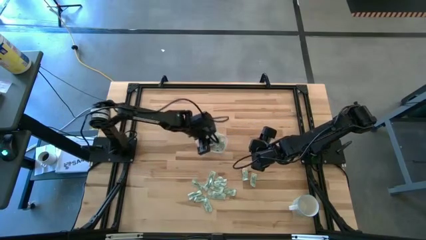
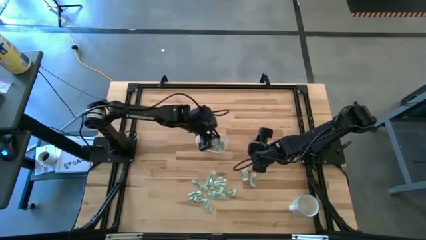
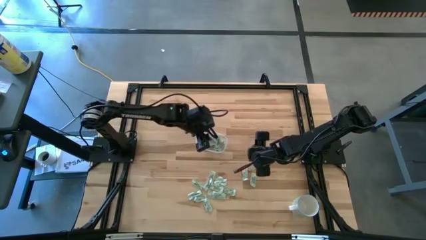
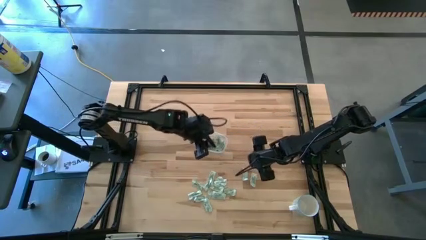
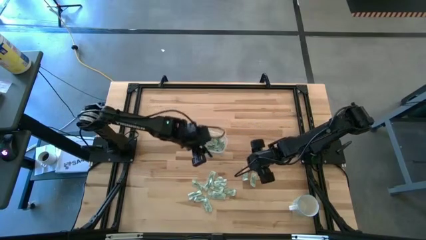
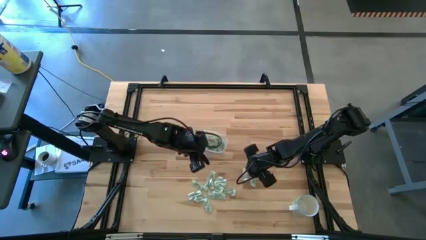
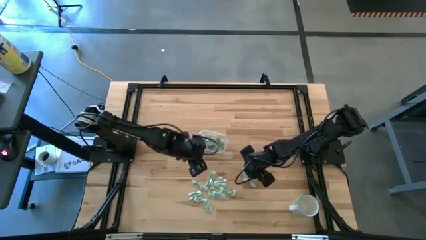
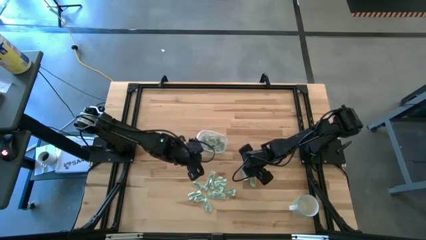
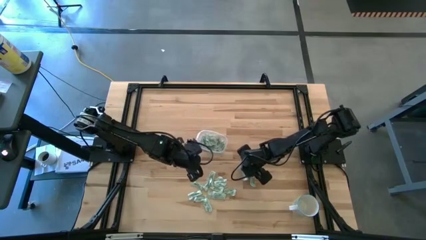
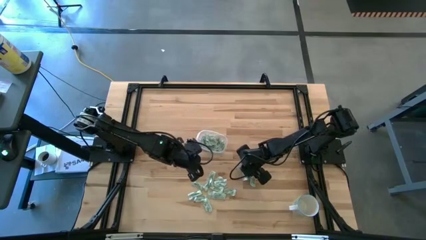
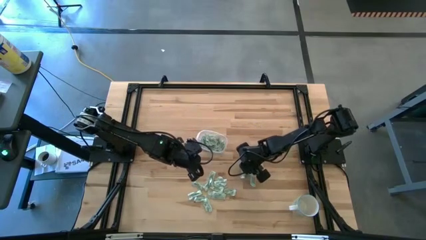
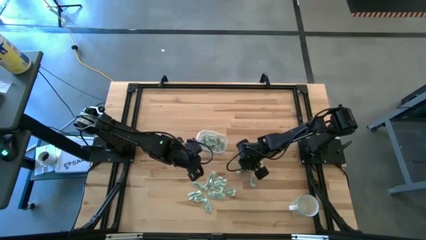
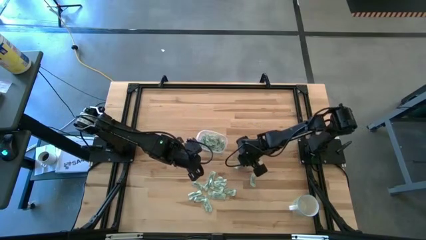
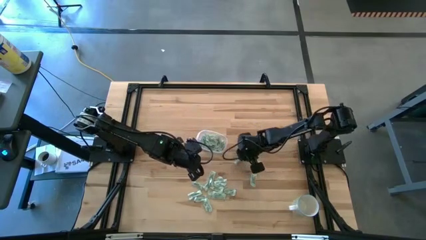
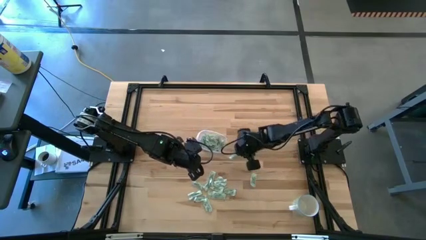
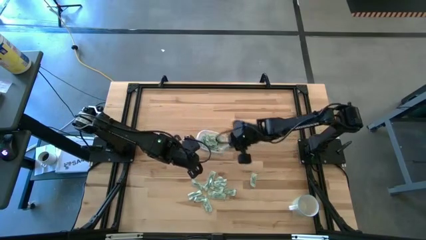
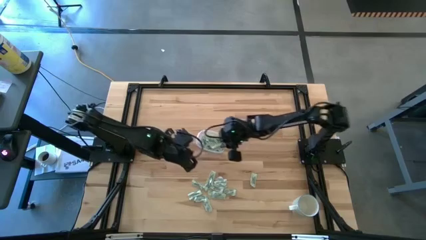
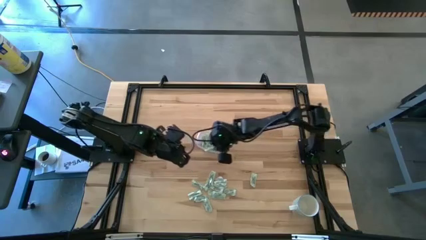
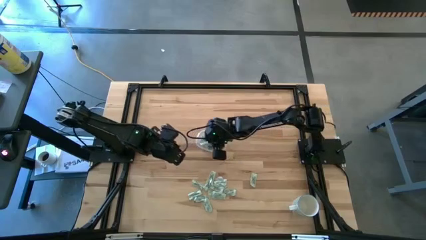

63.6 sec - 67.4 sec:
Task: Pick and place Stevia / Truvia into bins
Put the stevia packet into the transparent container

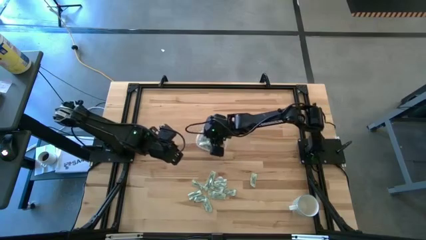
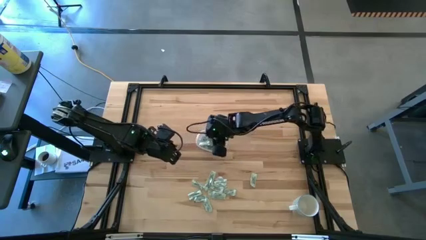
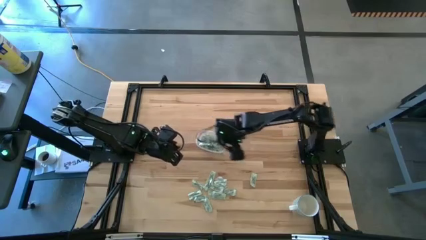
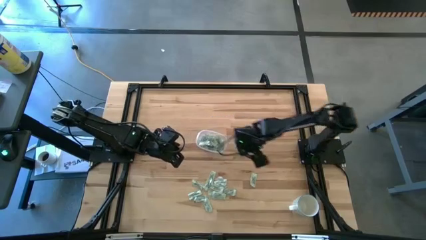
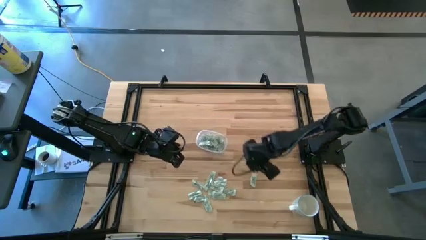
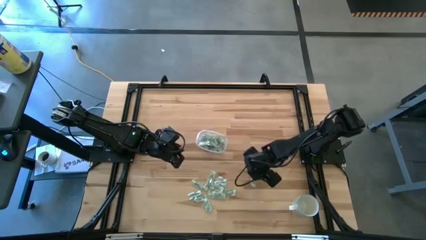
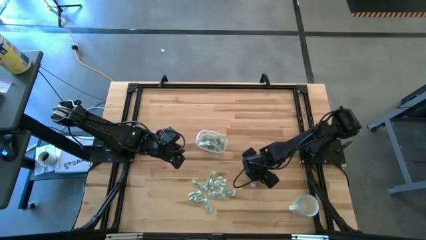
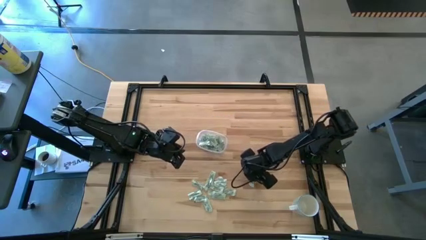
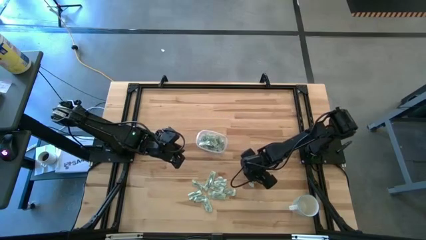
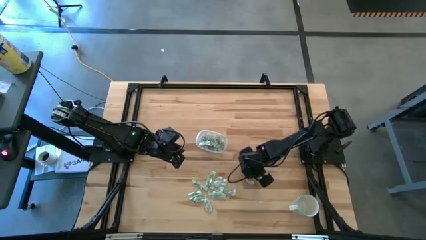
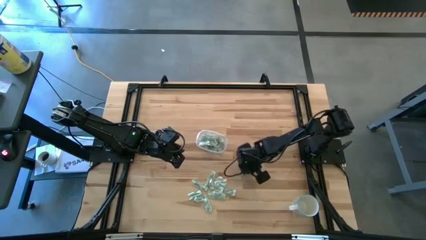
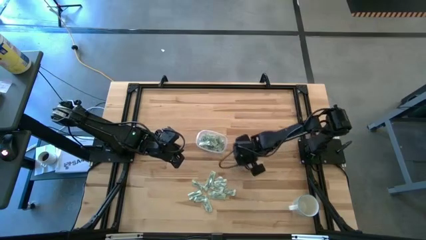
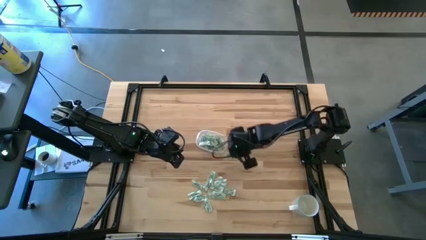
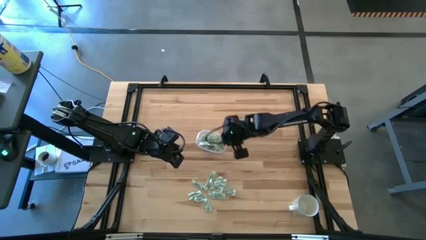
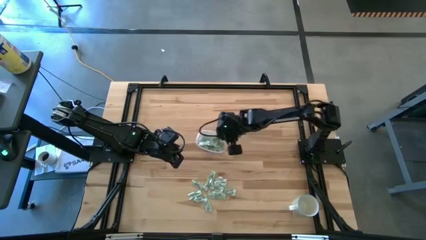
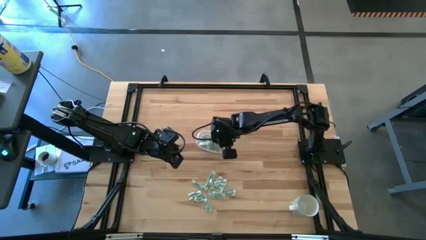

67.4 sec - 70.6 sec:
Put the stevia packet into the transparent container

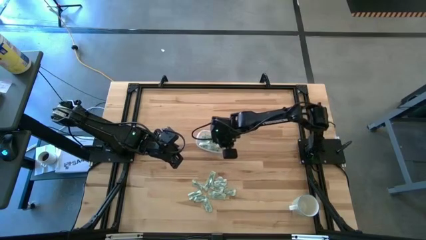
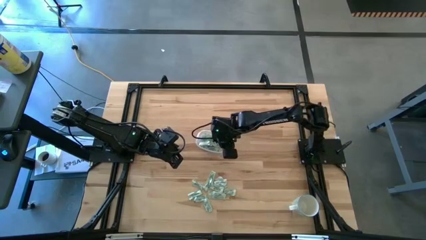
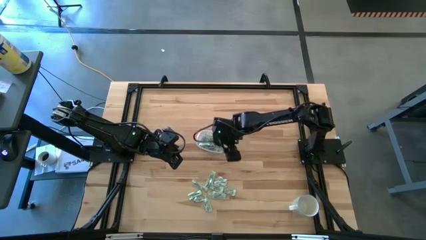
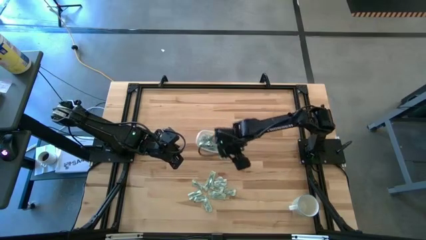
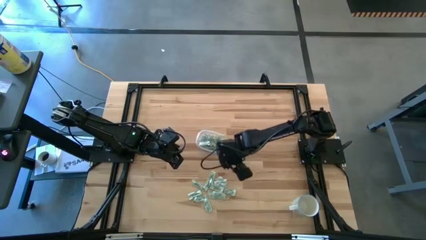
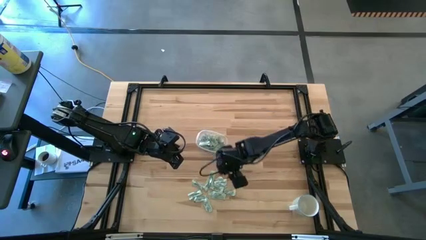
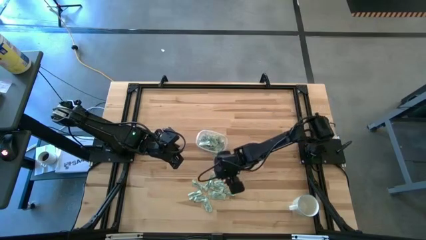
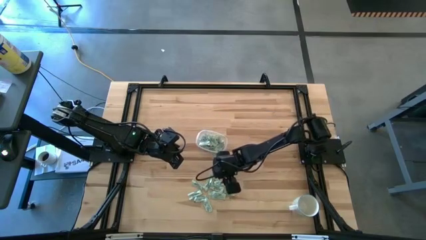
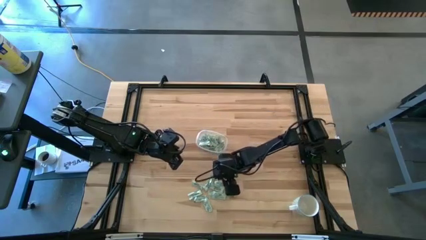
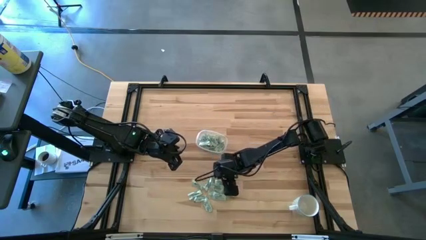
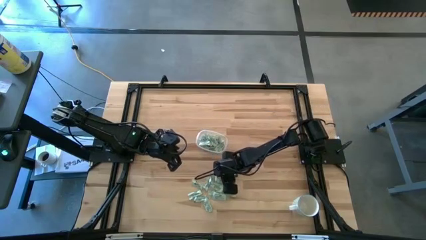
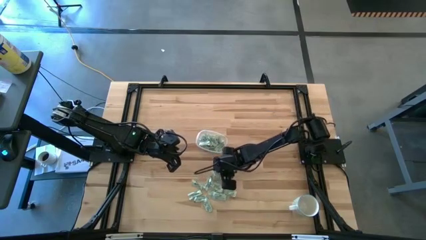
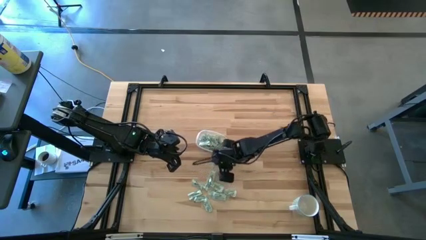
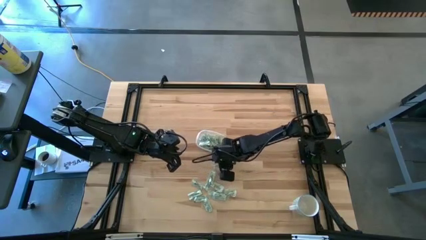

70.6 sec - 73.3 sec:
Put the stevia packet into the transparent container

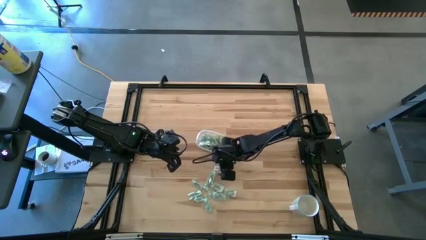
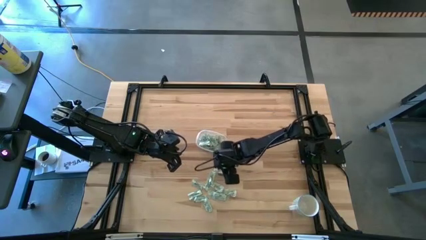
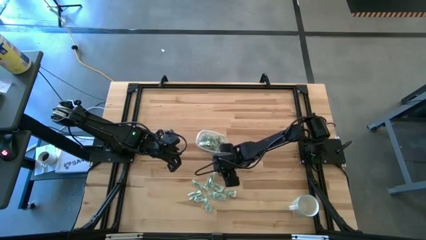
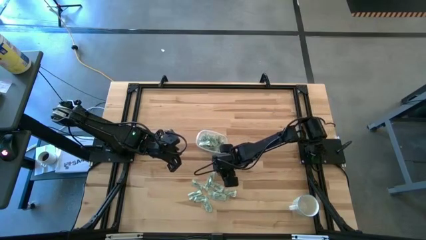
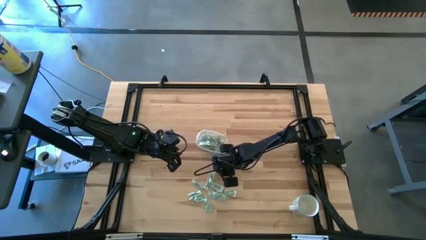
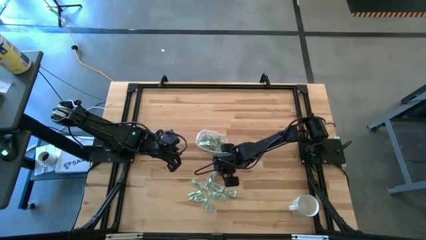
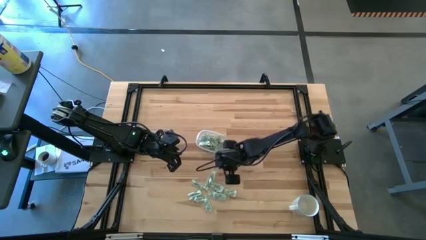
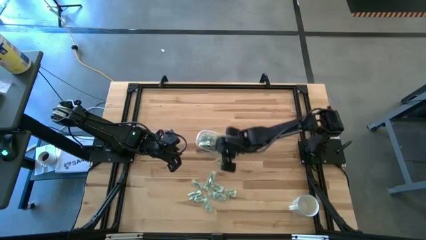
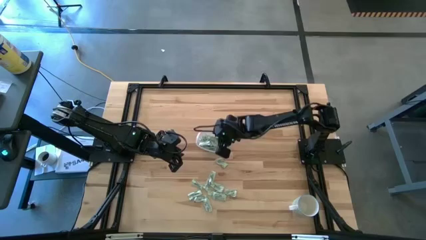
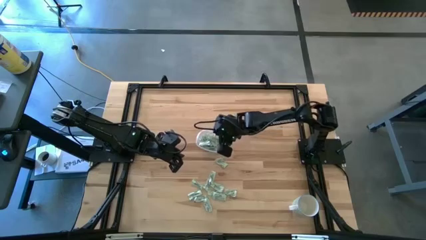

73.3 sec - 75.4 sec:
Put the stevia packet into the transparent container

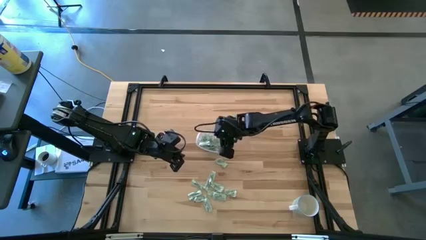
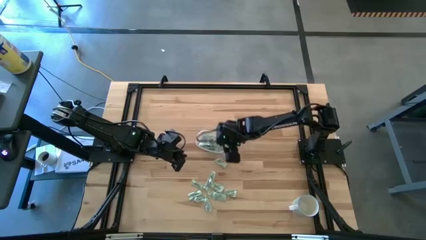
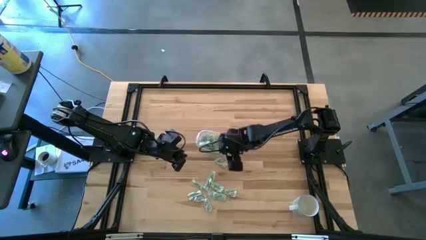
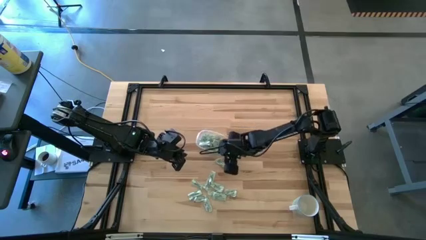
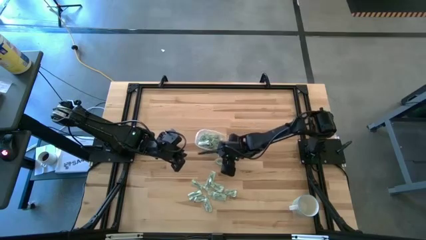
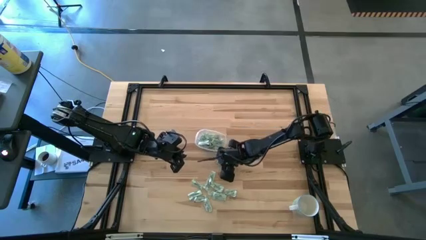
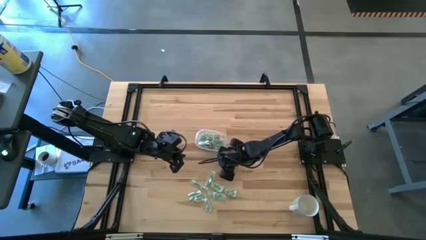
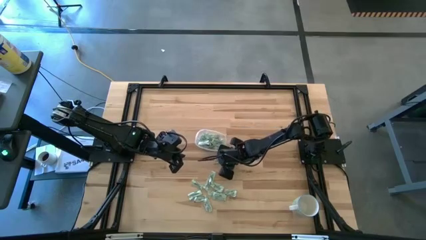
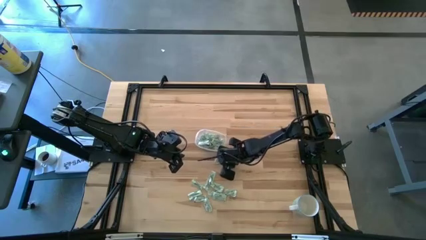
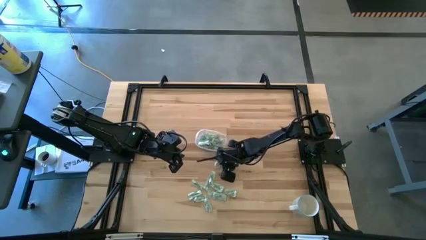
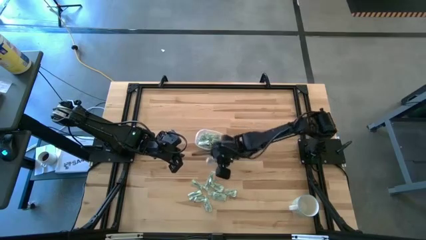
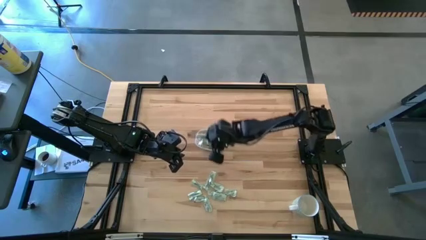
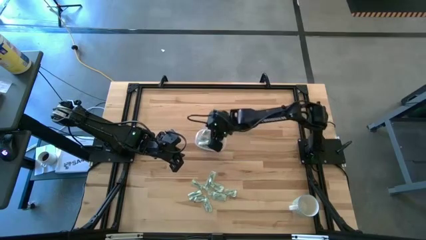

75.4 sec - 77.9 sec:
Put the stevia packet into the transparent container

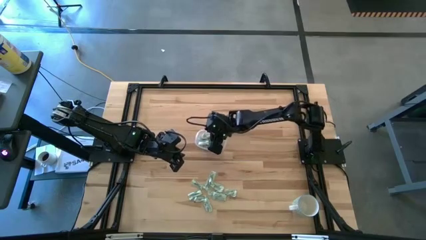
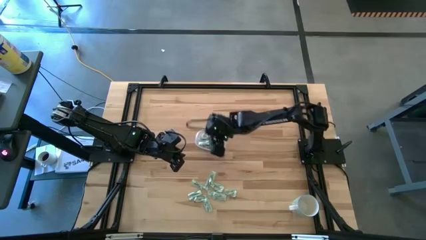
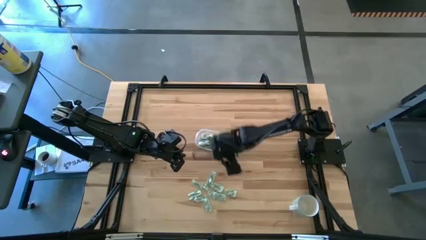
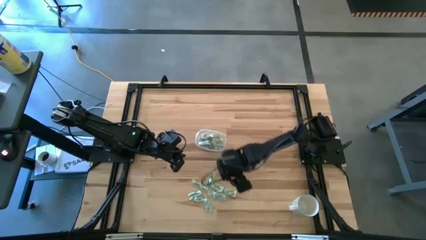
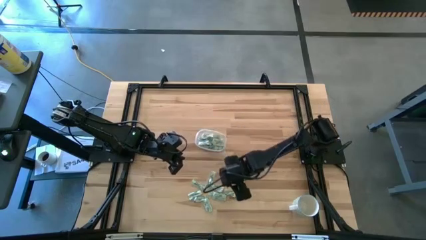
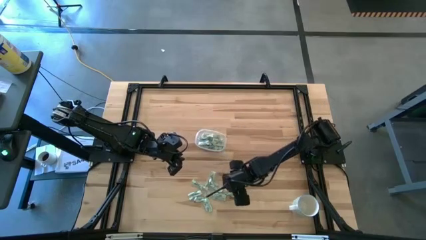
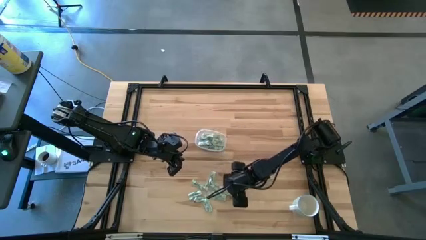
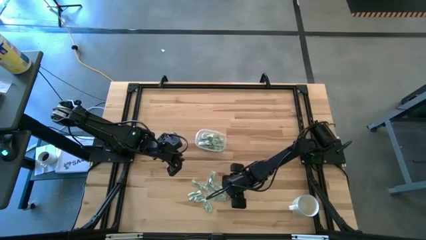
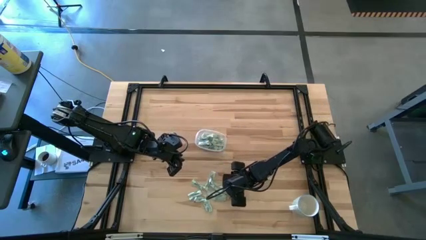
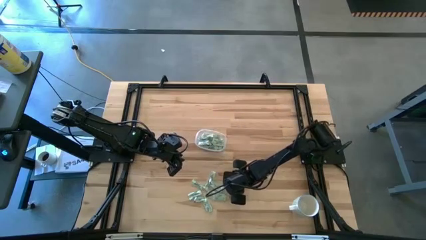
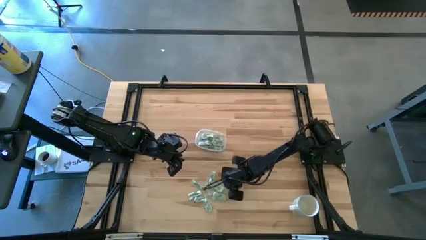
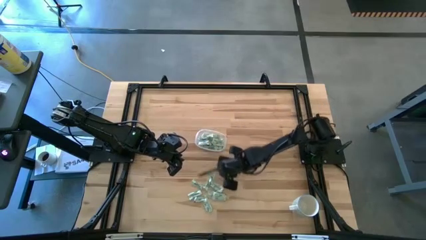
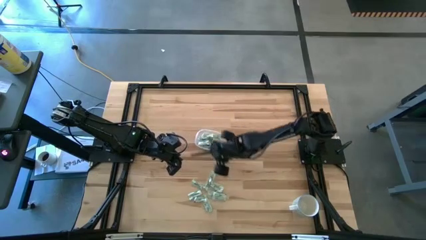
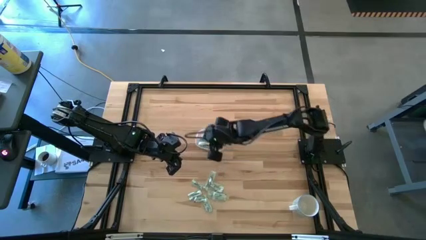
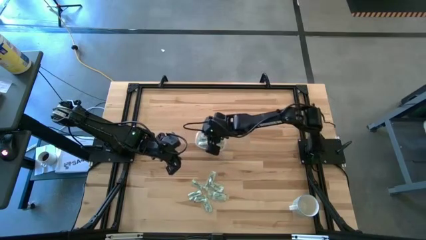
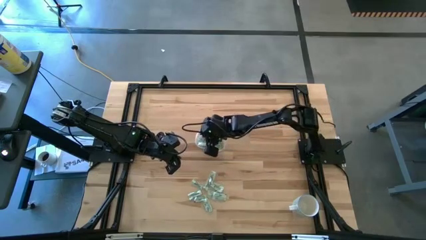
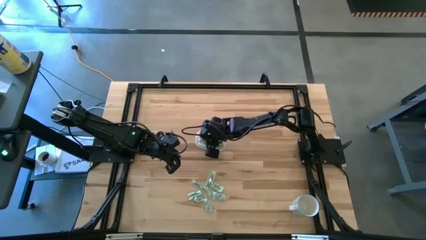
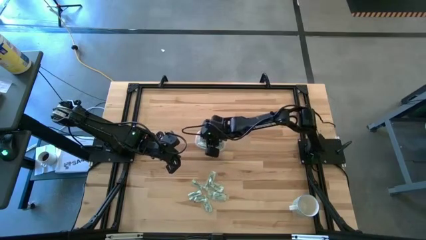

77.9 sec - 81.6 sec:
Put the stevia packet into the transparent container
